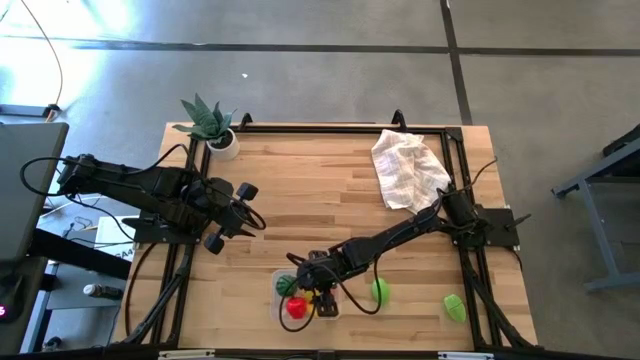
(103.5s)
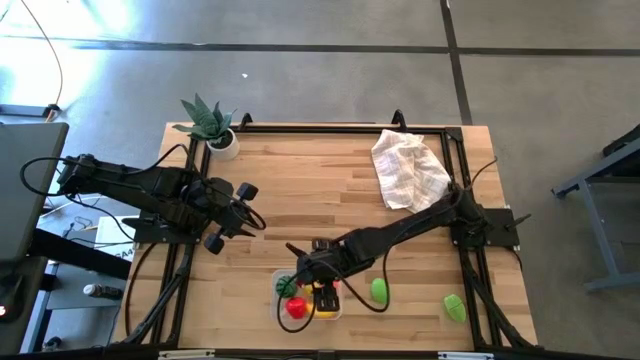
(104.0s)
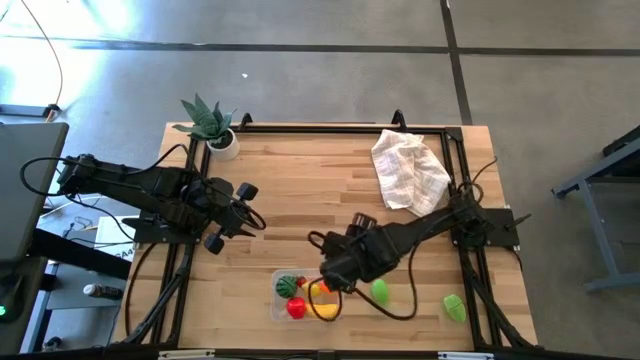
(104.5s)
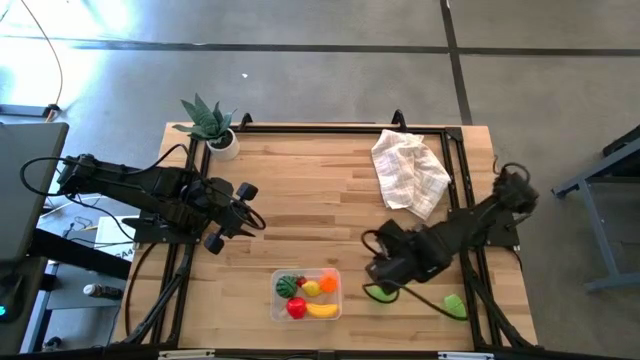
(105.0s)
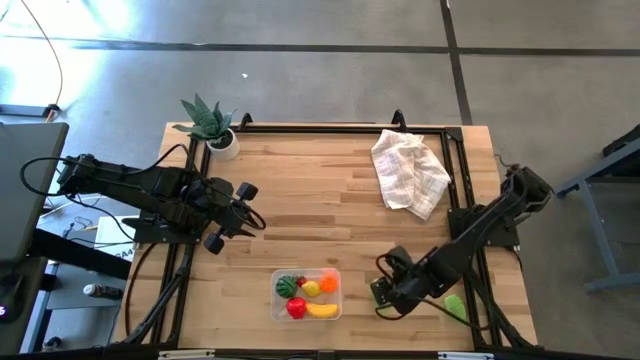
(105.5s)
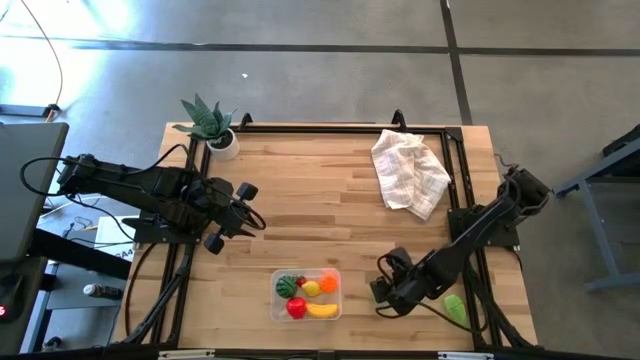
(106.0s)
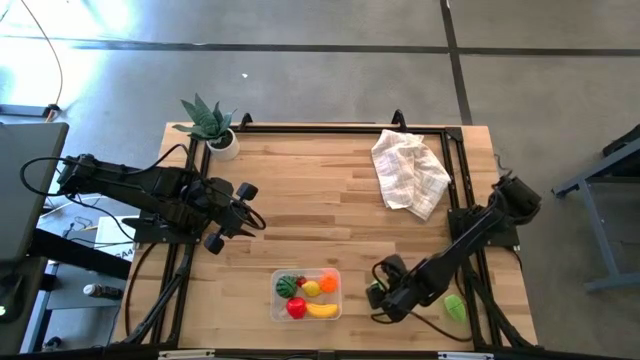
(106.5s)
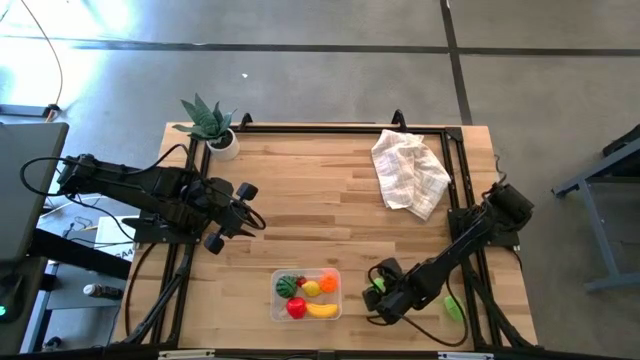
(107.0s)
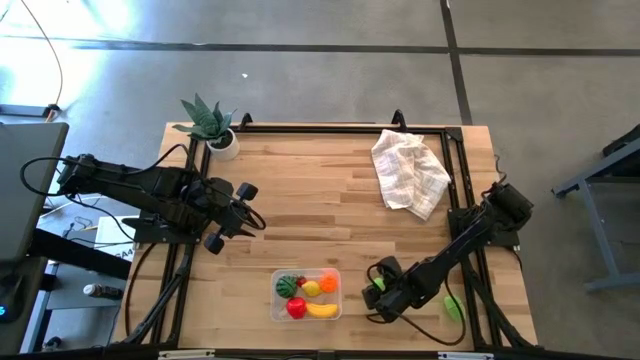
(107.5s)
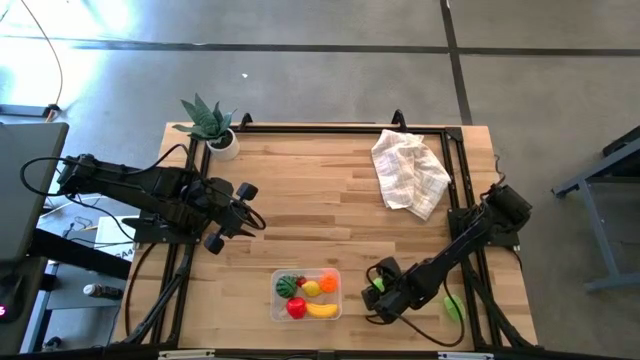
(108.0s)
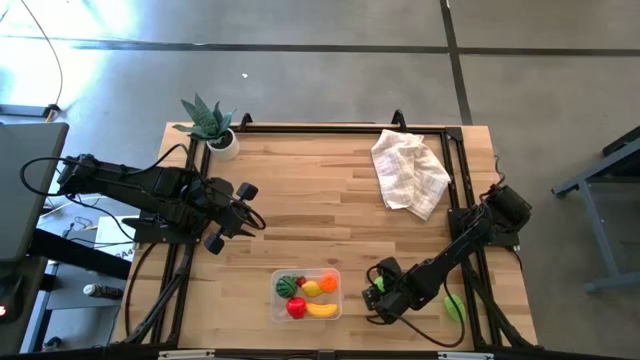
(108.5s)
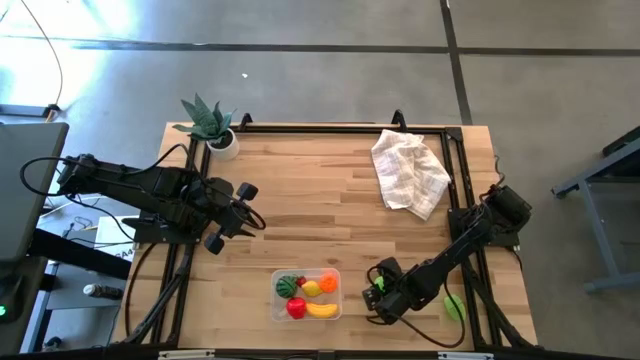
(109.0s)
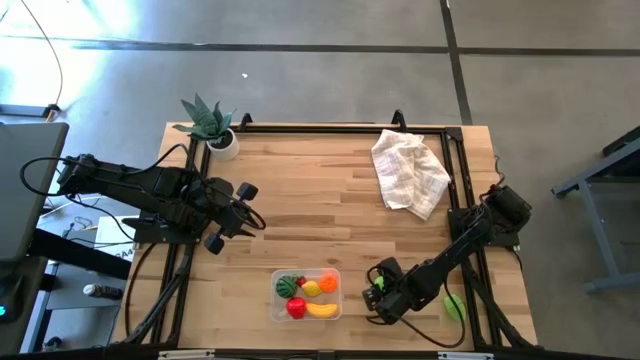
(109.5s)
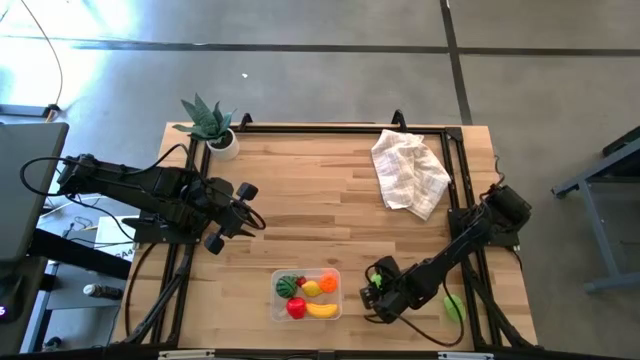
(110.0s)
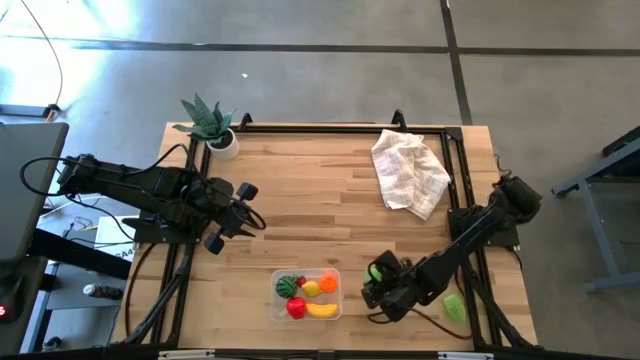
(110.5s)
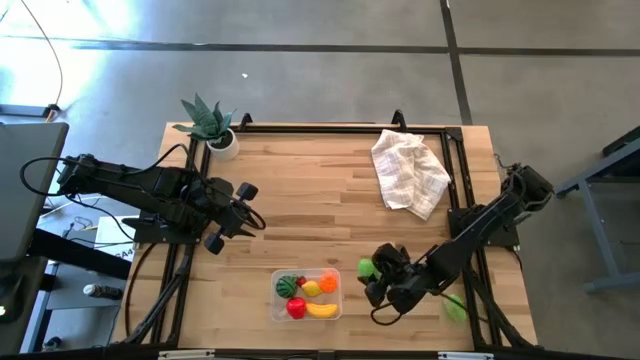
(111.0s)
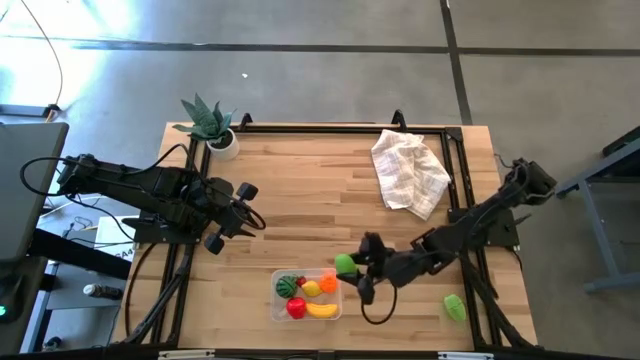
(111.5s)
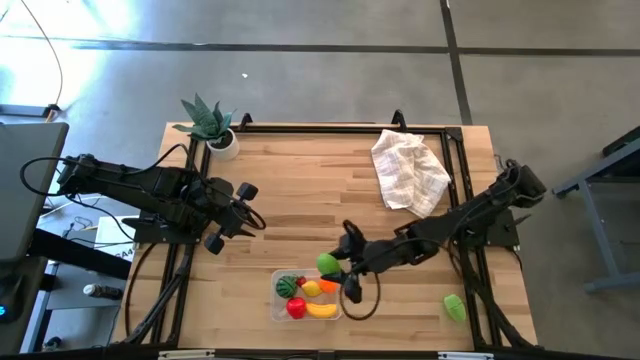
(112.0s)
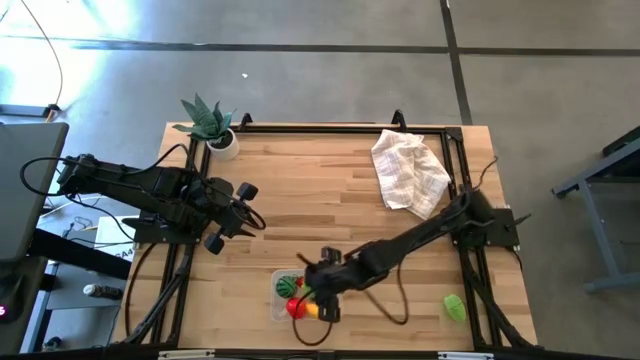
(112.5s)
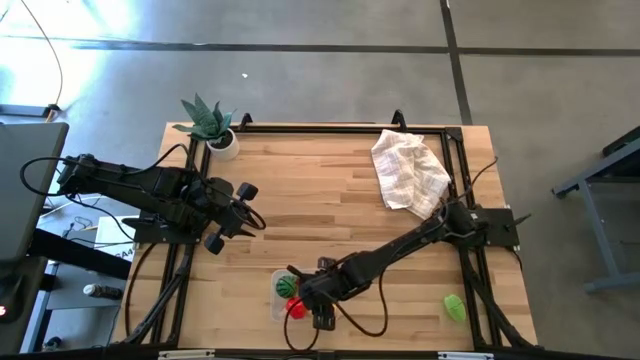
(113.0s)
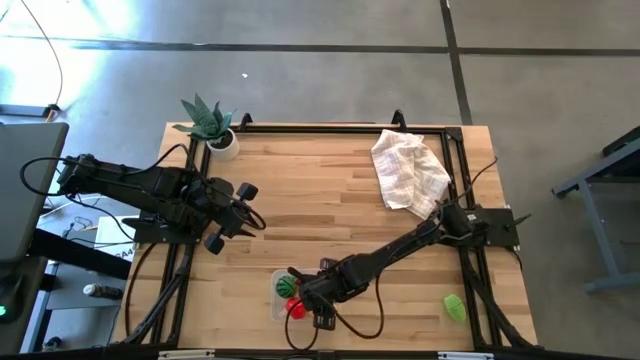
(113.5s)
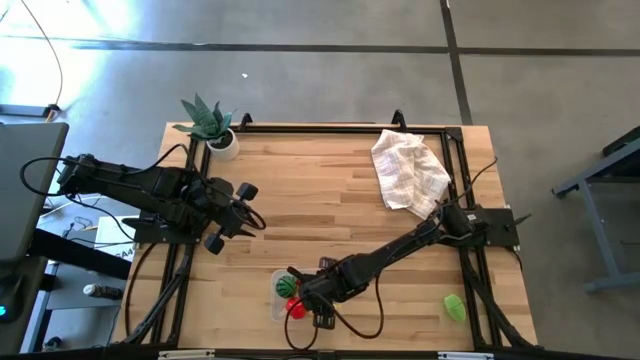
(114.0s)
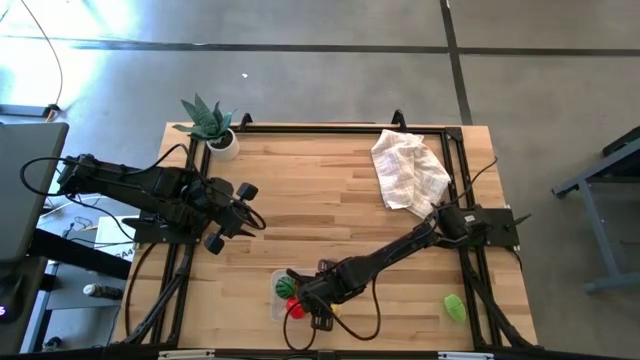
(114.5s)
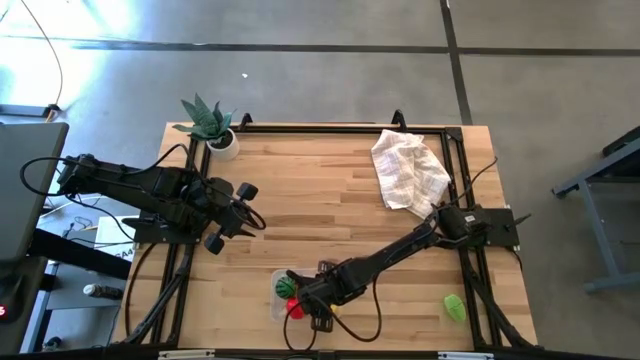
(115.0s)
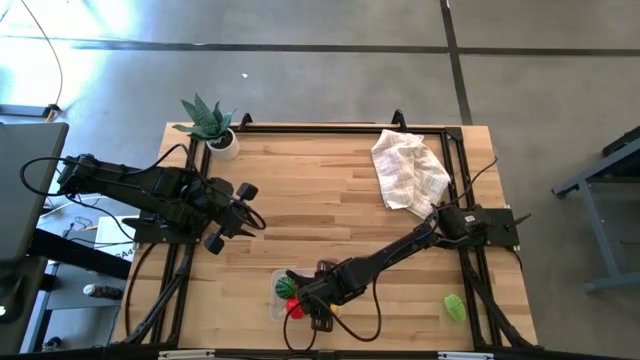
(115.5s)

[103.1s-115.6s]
Task: Pick and placing Produce into tupperware
Put the melon into the bin

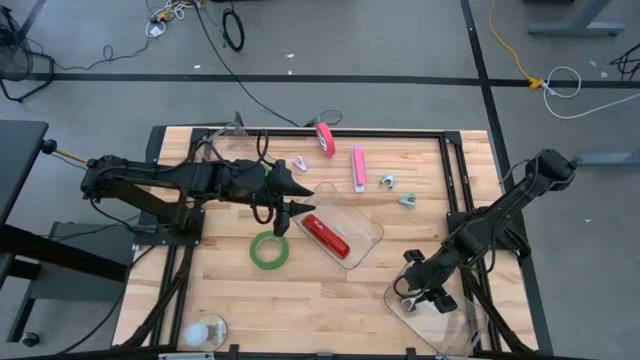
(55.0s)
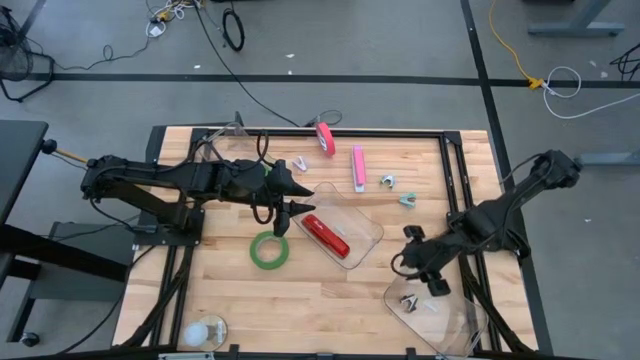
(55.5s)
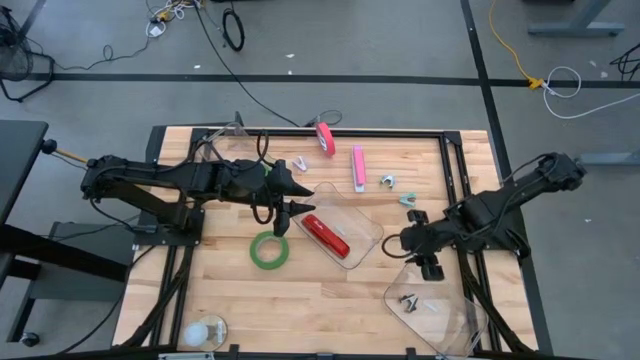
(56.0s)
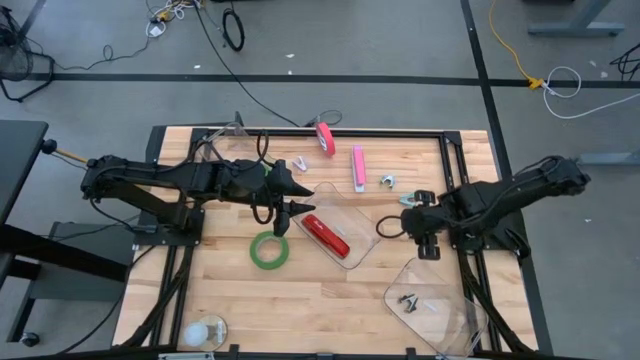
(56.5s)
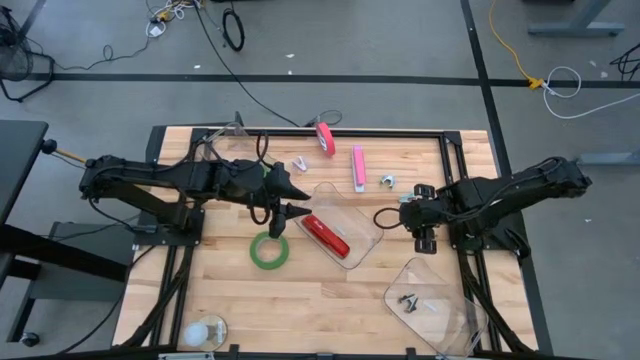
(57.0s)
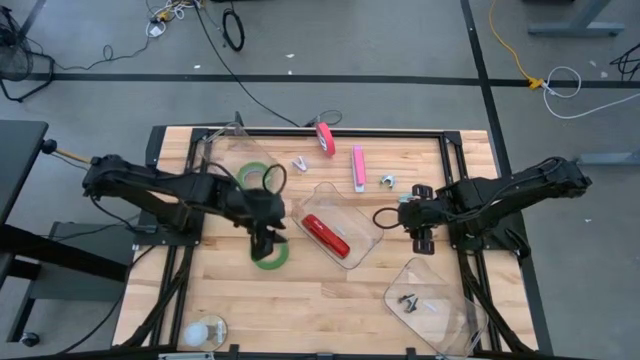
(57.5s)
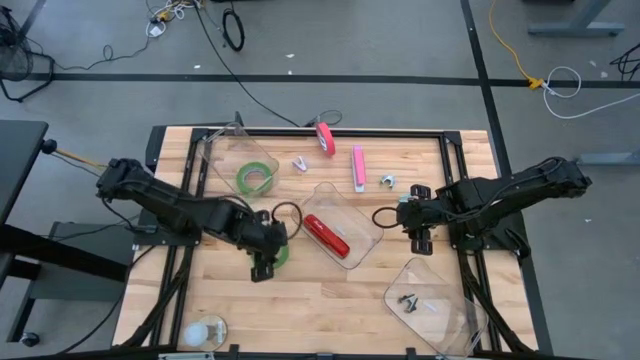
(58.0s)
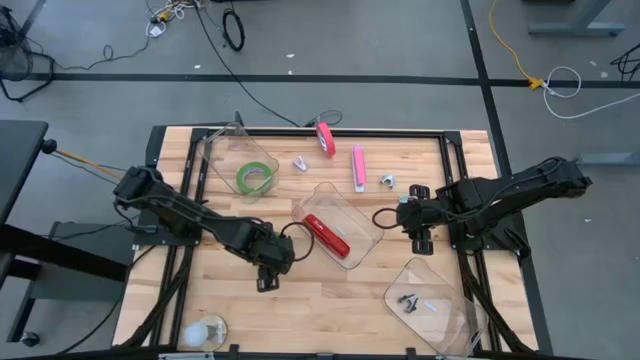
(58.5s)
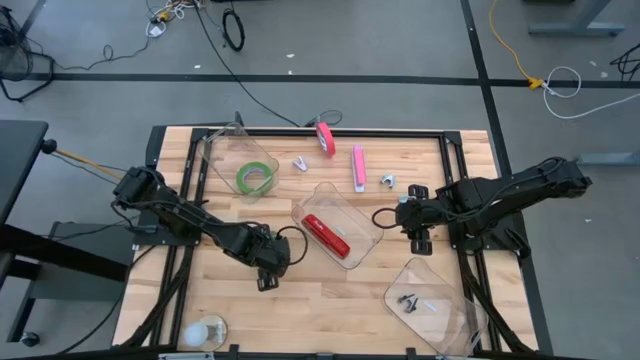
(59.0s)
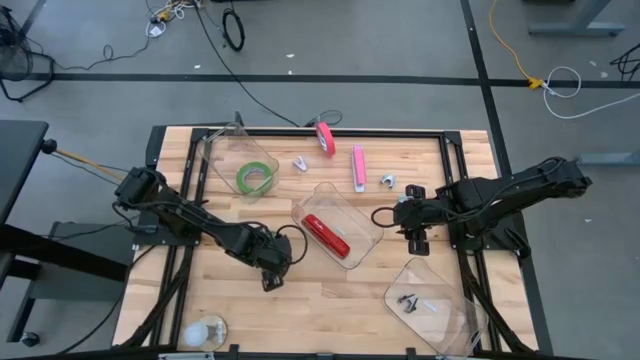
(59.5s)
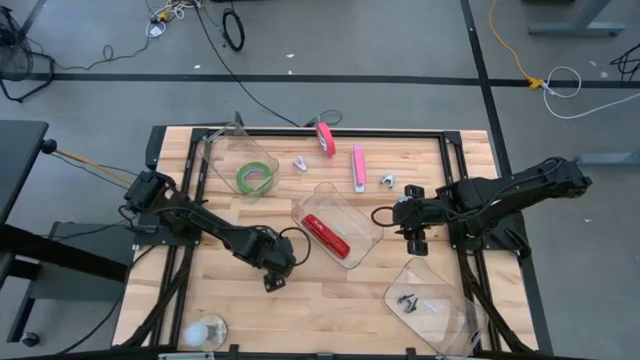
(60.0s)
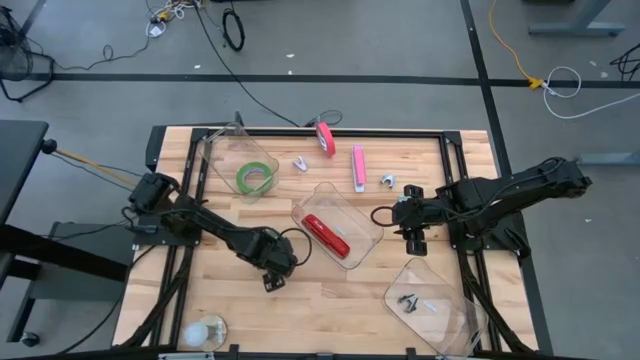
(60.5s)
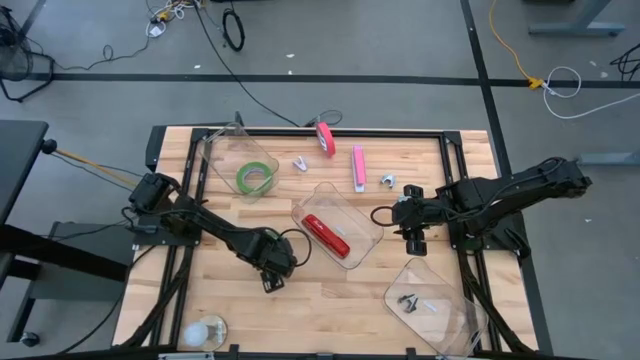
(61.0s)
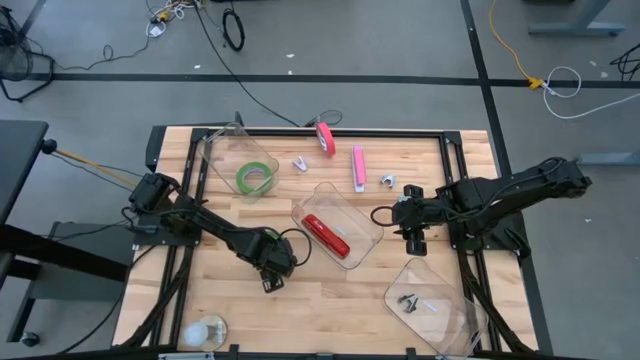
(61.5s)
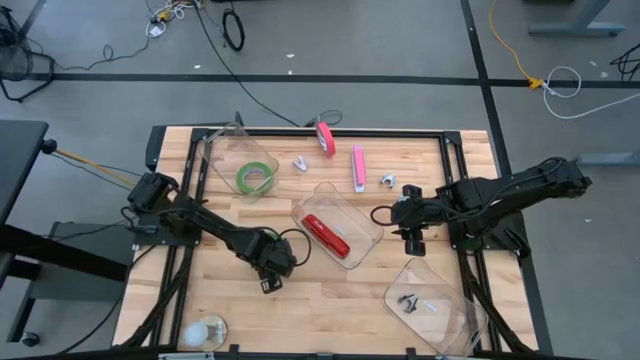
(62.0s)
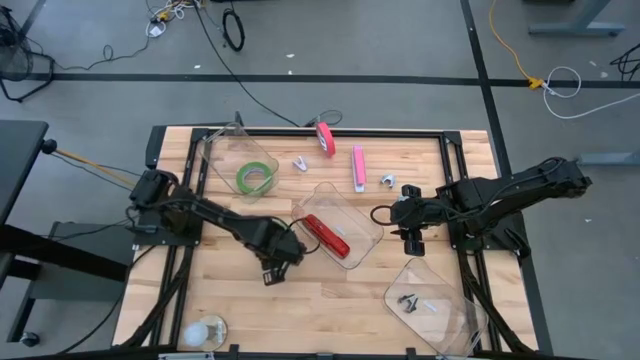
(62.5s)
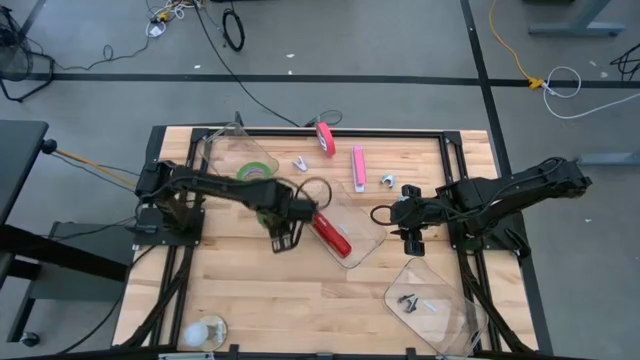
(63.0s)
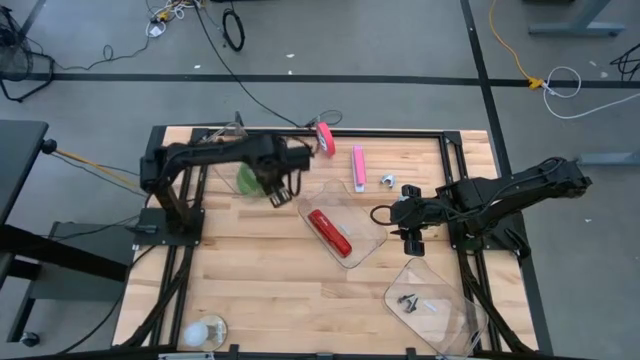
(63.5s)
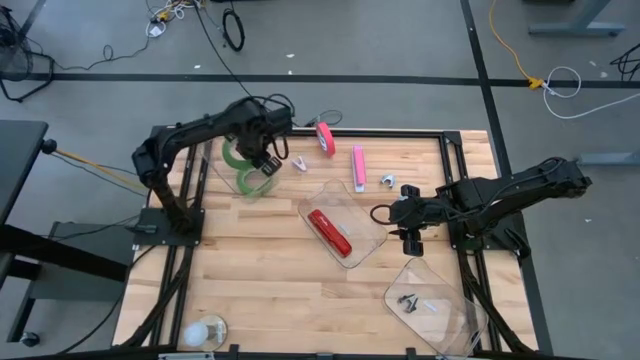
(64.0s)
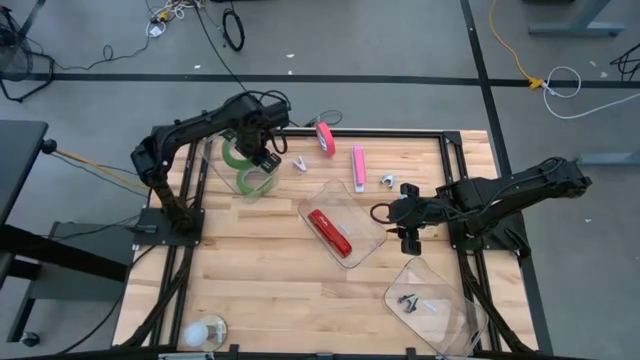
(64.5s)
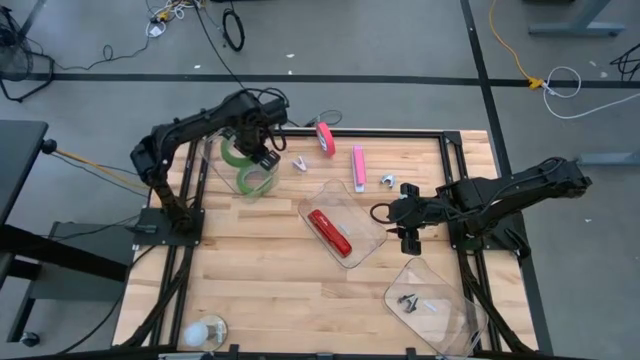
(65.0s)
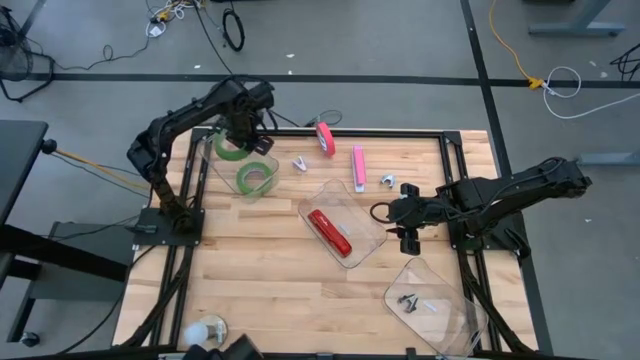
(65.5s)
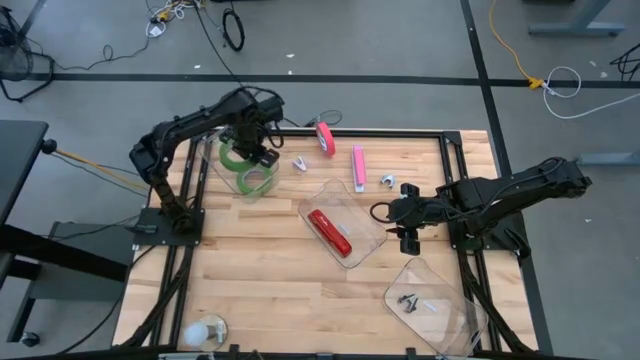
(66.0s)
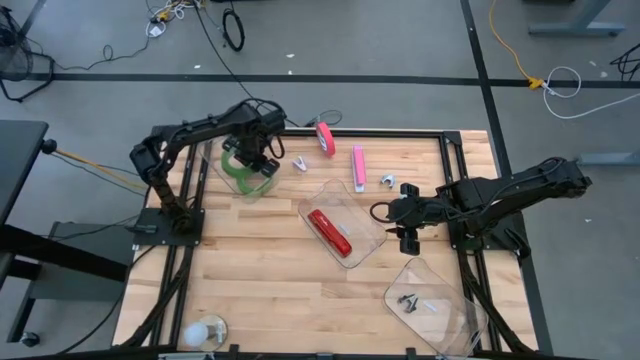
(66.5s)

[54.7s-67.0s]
Task: Pick and place Stapler, Stapler remover, tape
Put the green tape into the top transparent bin
